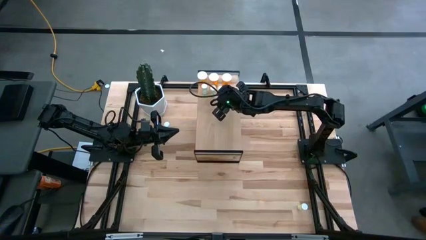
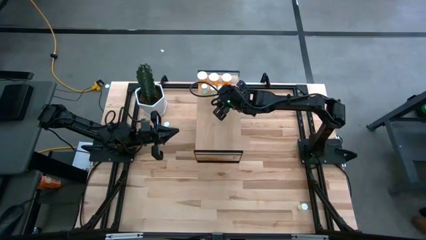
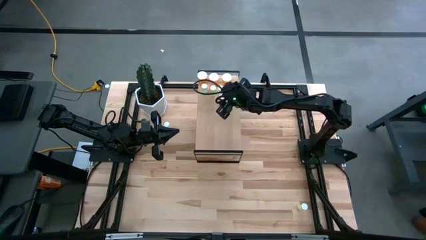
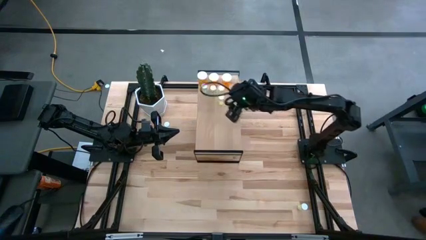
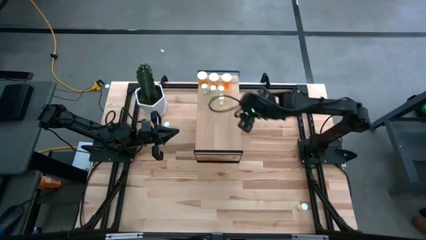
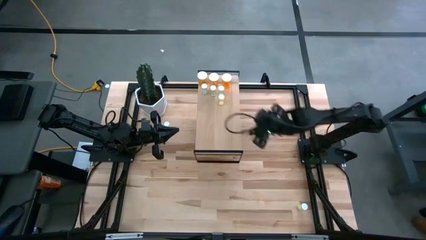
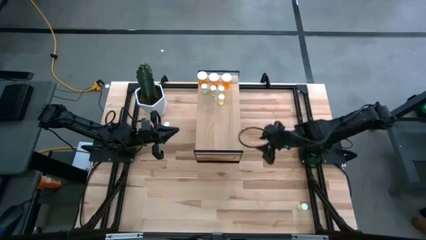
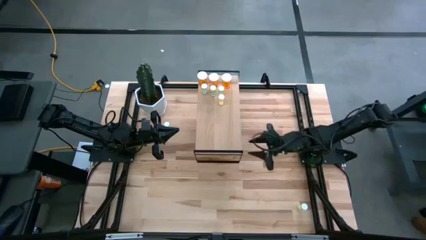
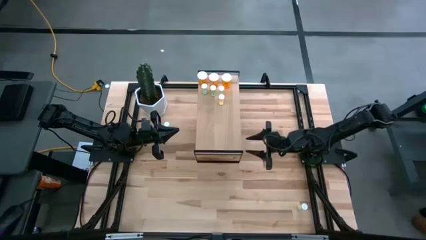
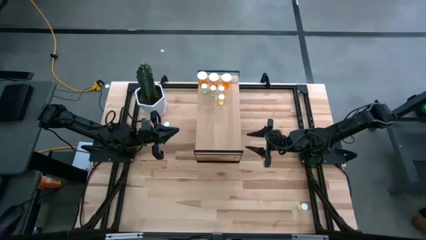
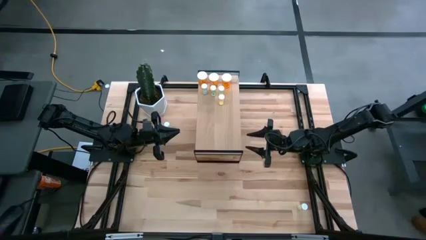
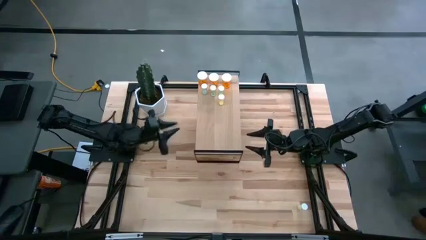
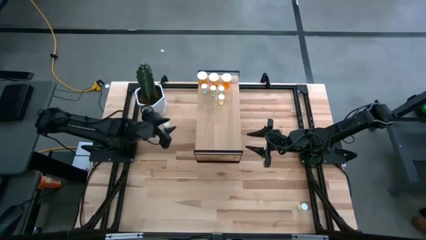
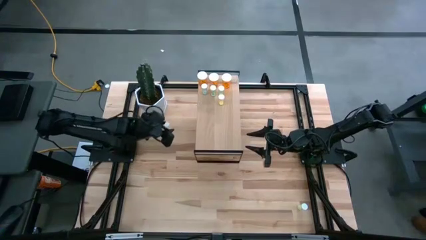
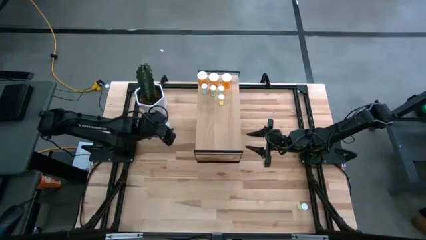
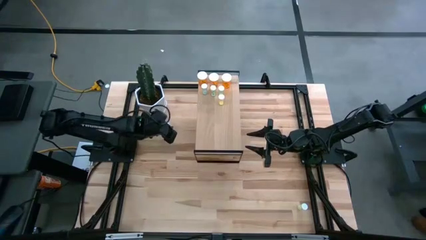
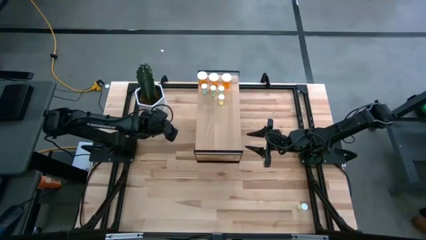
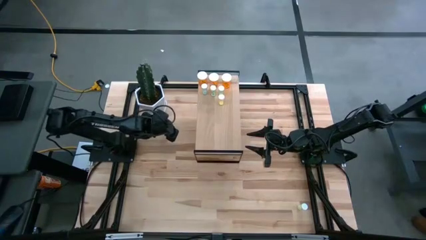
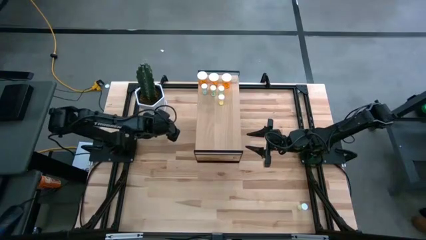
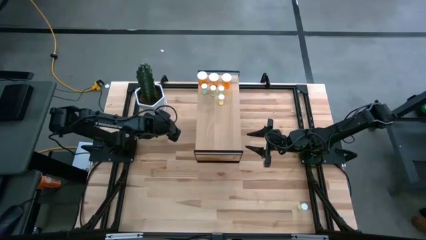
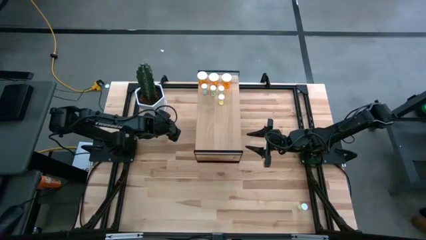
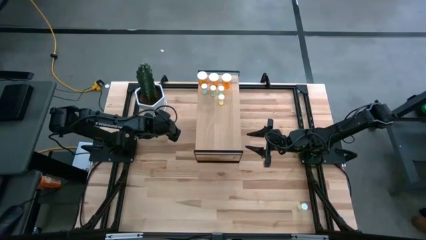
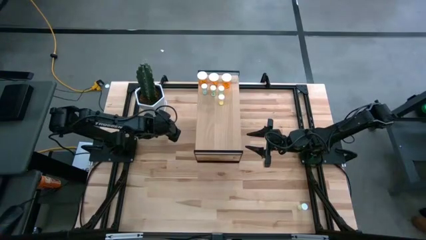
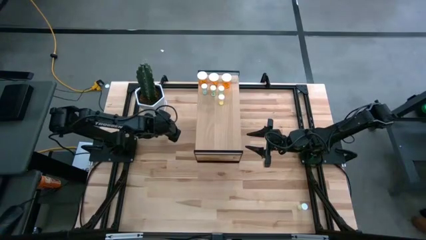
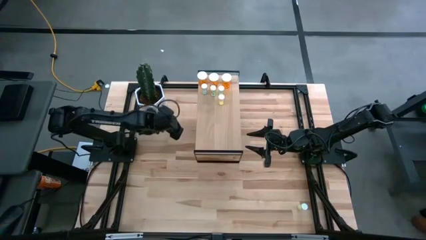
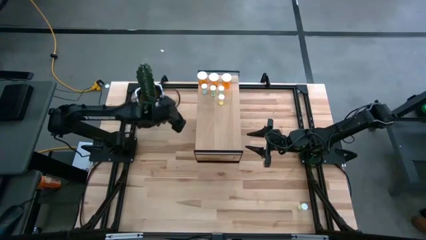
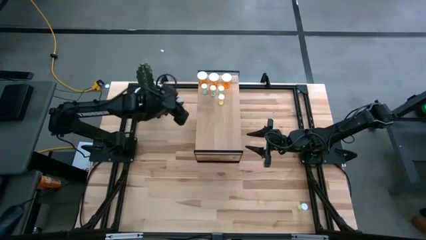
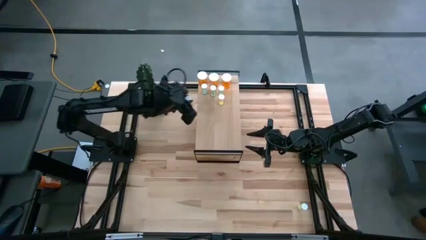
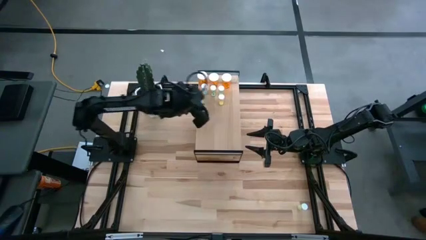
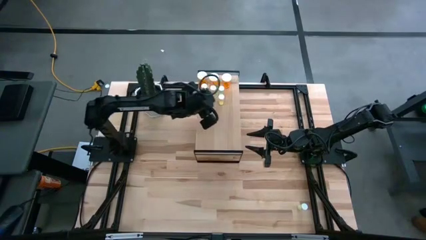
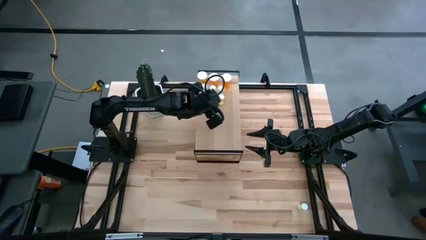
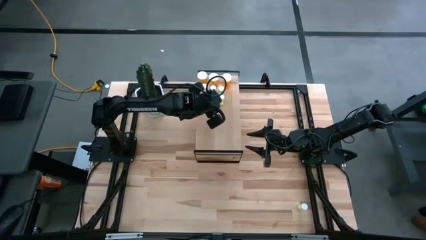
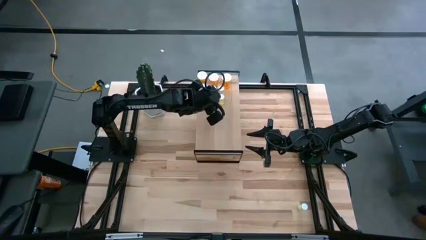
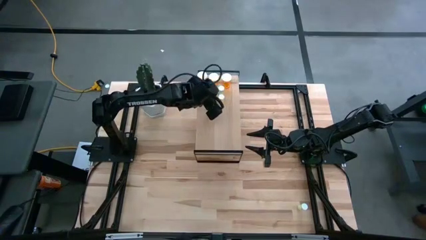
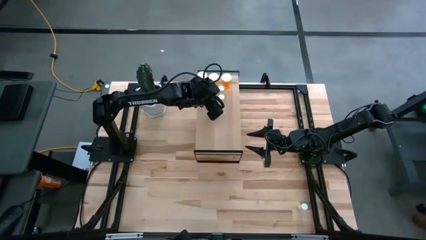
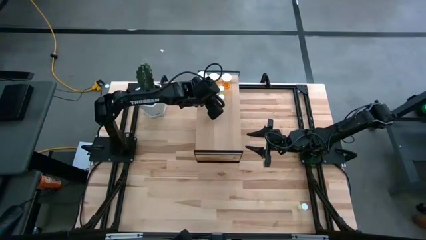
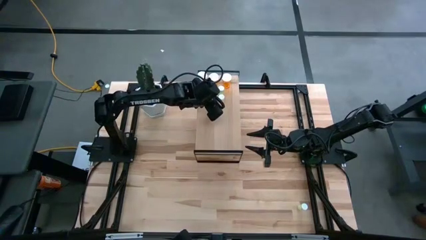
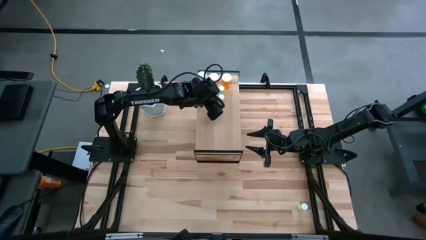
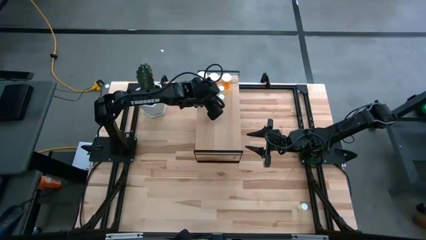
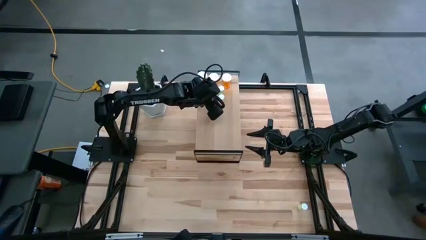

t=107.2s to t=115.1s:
Task: Pick and place medicine bottles onto shelf by color
Put the top yellow pill bottle on the shelf aligned with the other yellow pill bottle

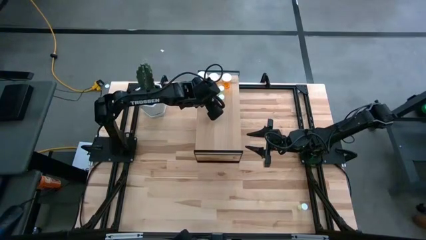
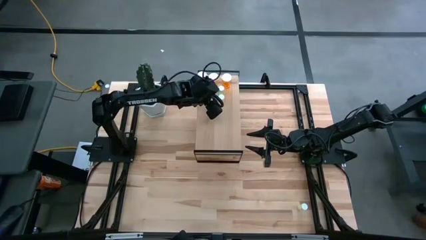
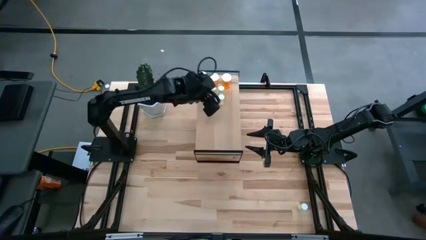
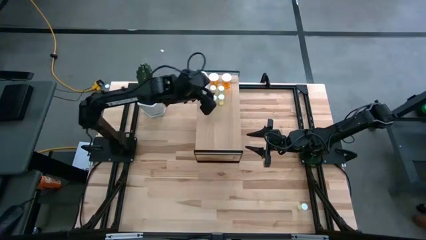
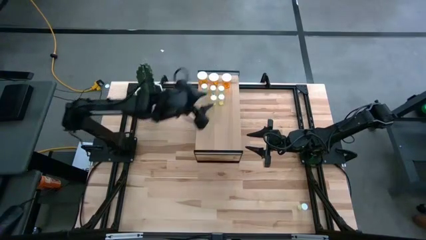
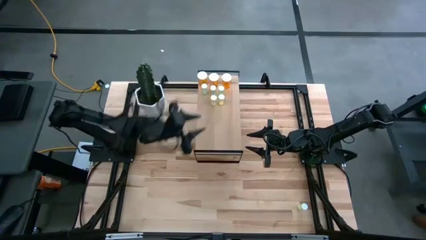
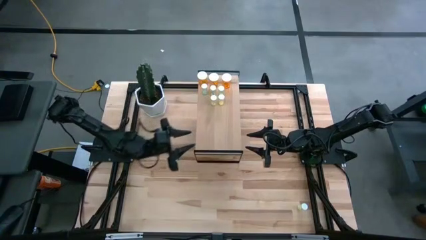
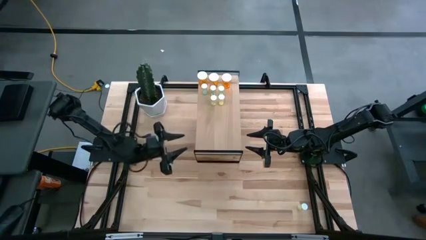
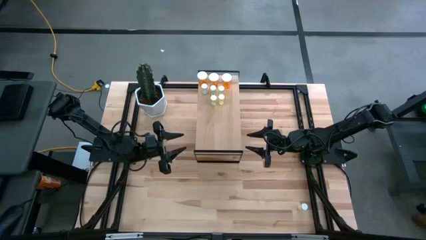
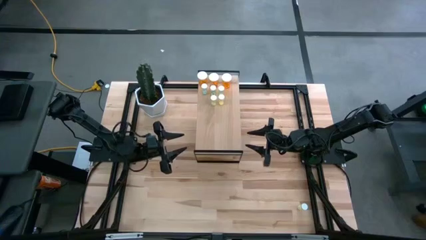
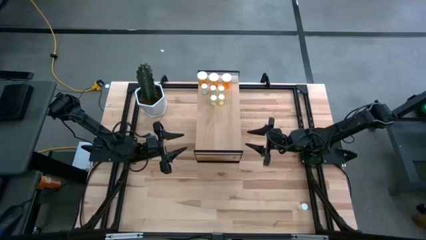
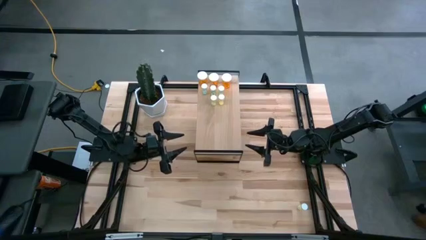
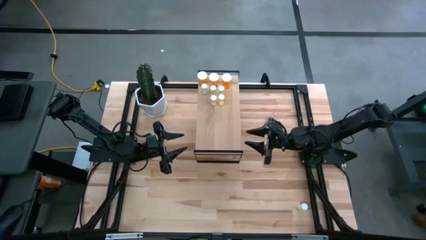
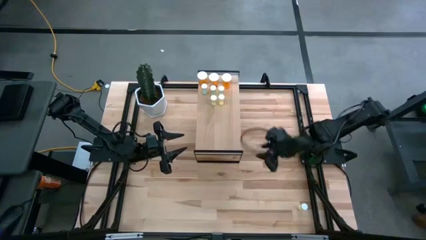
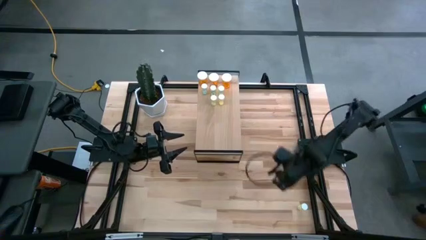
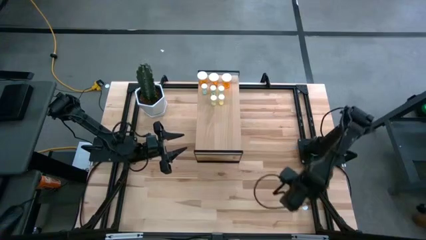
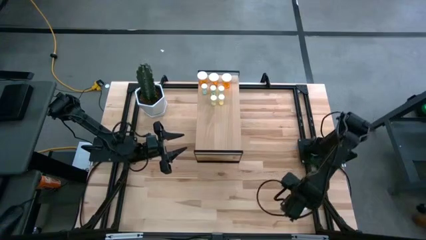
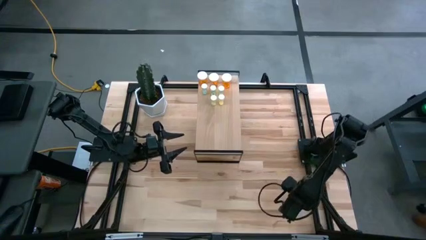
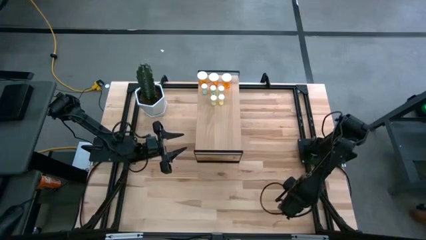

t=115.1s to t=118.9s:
Put the yellow pill bottle on the shelf aligned with the other yellow pill bottles

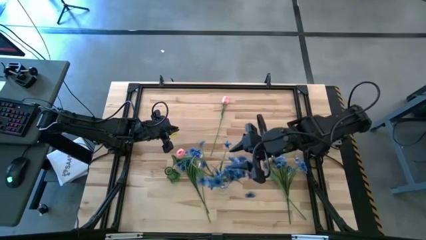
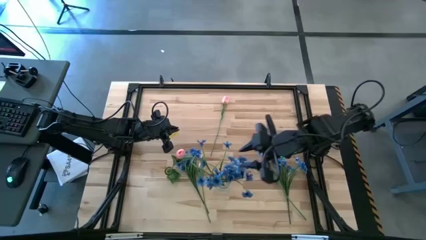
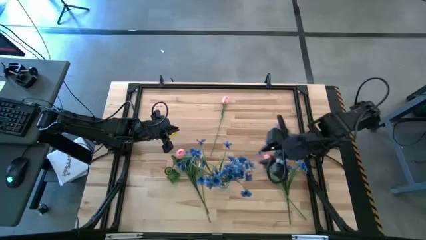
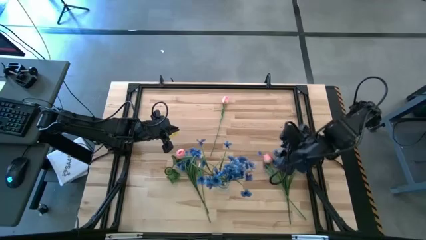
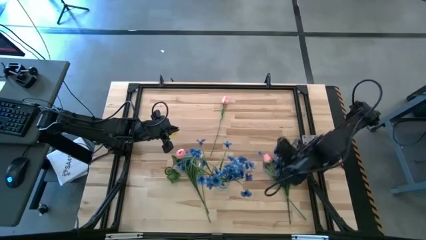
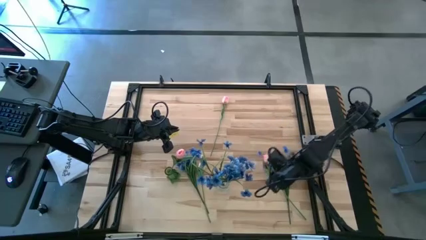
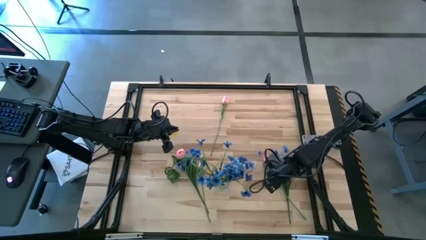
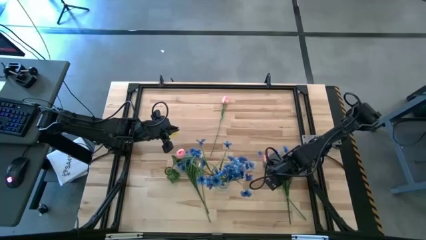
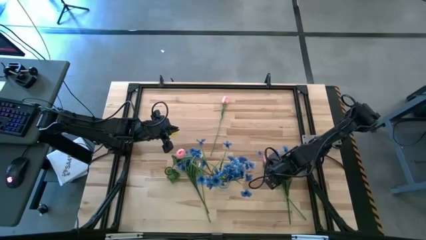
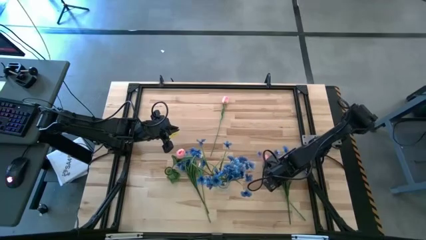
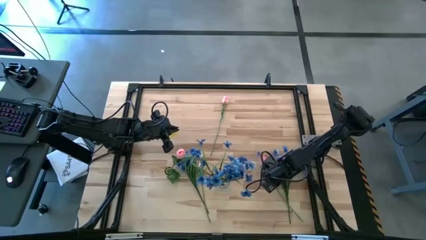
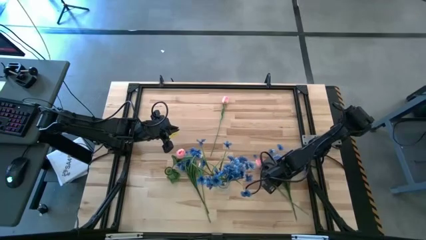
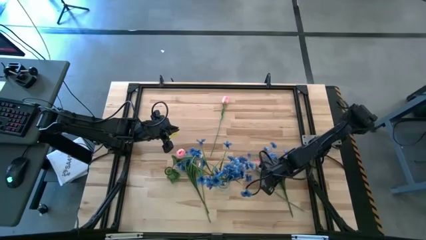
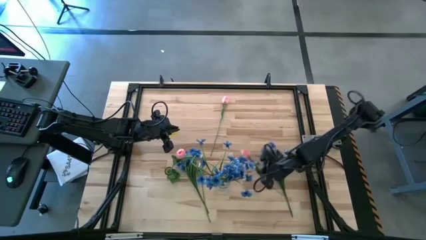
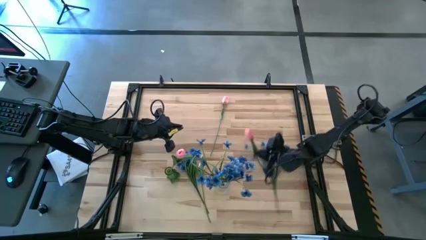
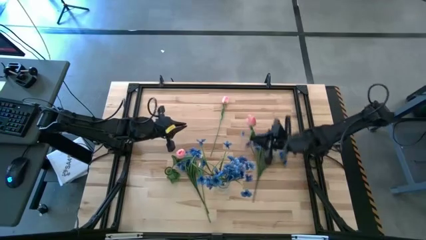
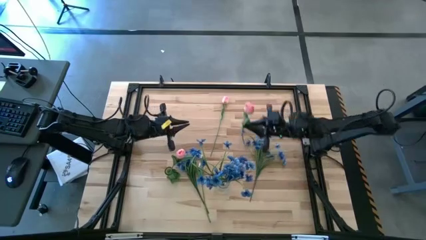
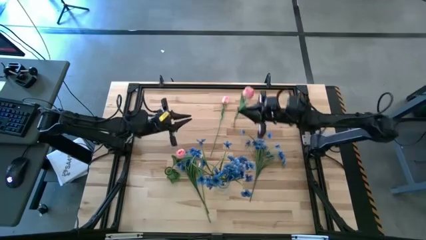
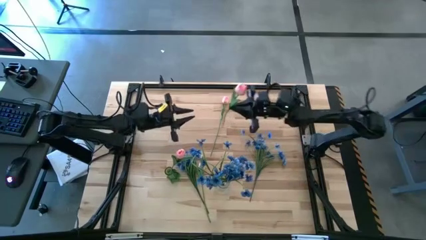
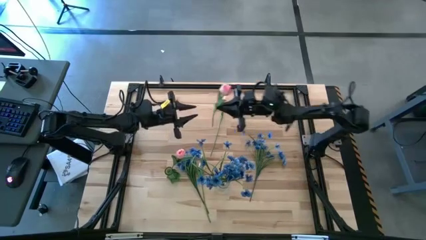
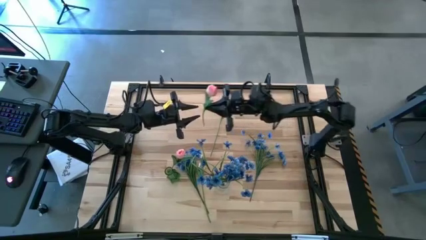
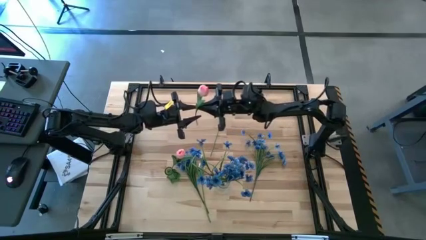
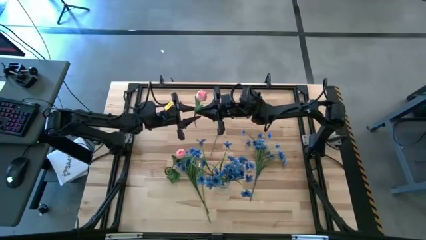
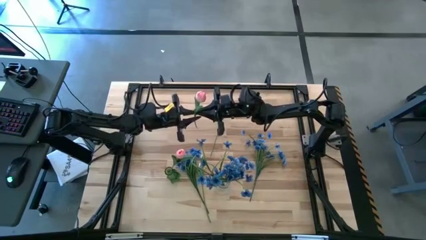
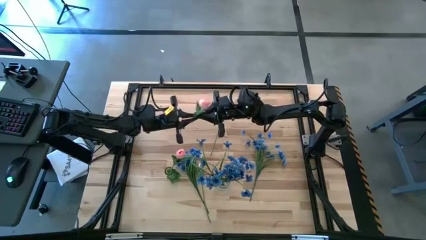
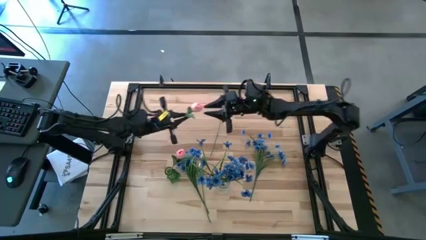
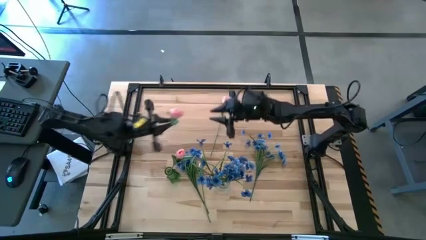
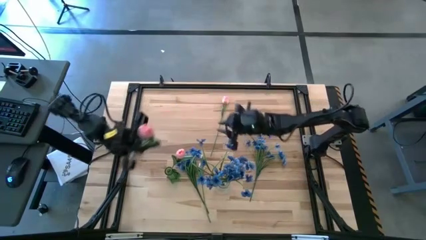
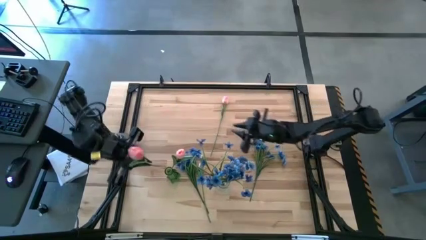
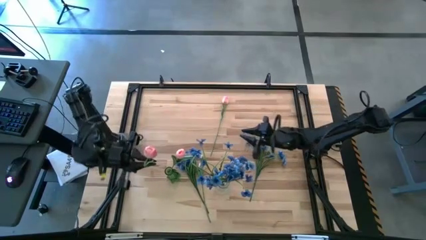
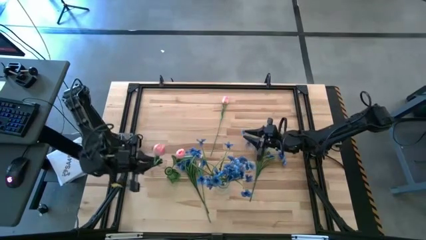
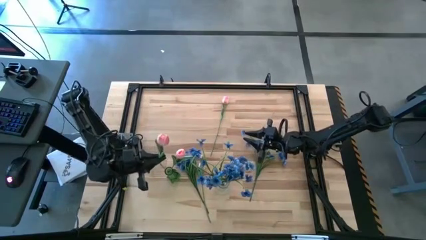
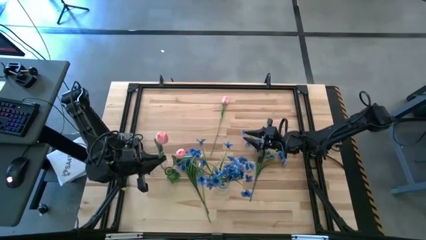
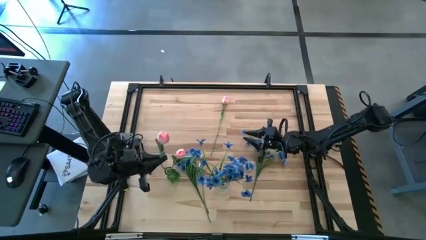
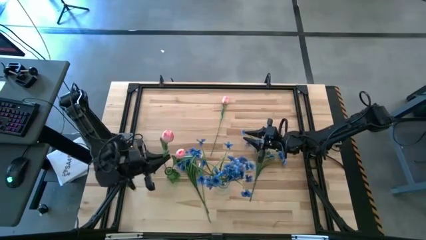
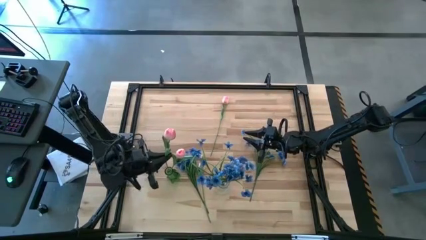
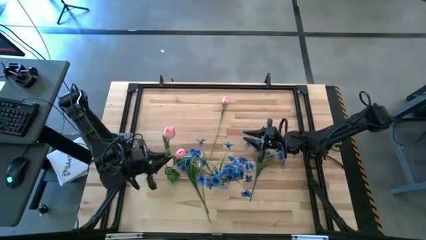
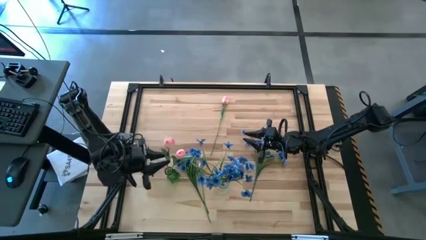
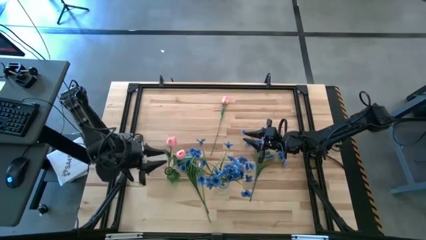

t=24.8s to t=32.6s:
Task: Sort flowers into vase by color
Put the bottom right pink flower into the green vase
